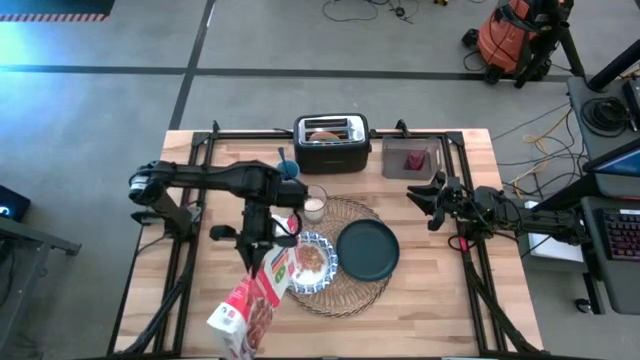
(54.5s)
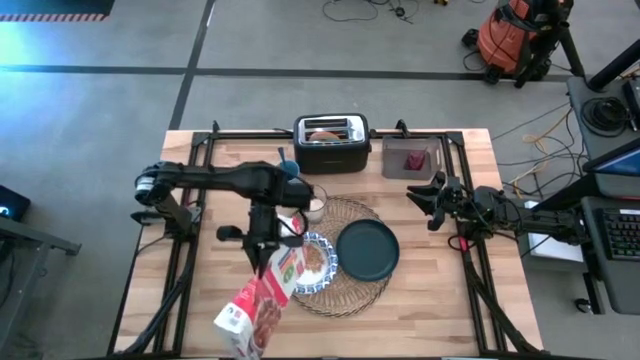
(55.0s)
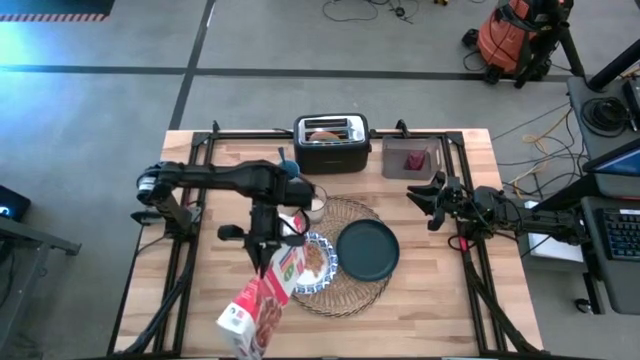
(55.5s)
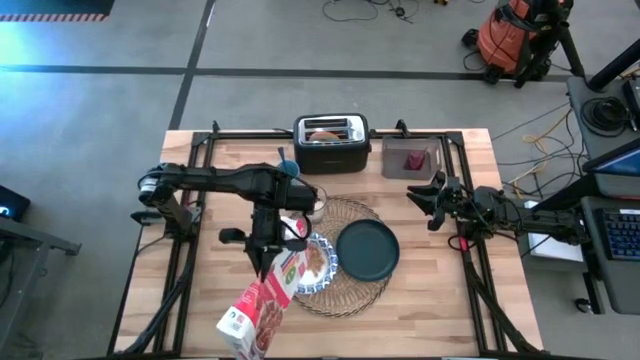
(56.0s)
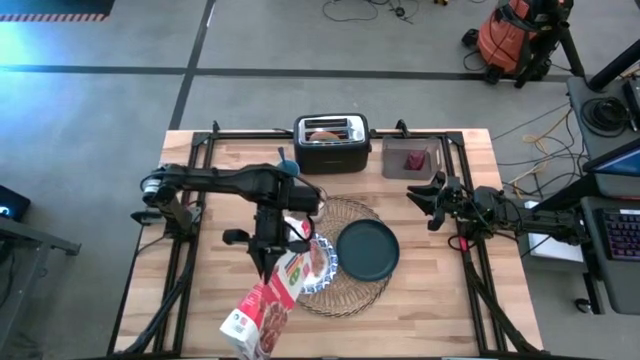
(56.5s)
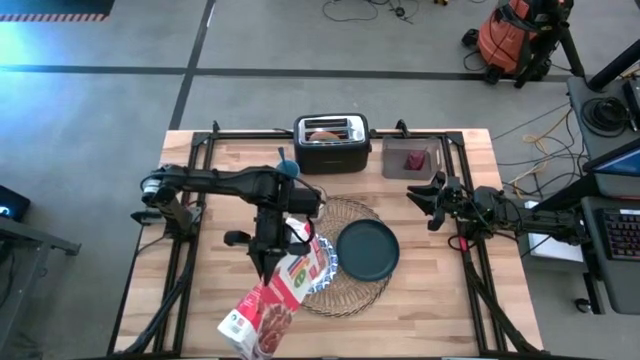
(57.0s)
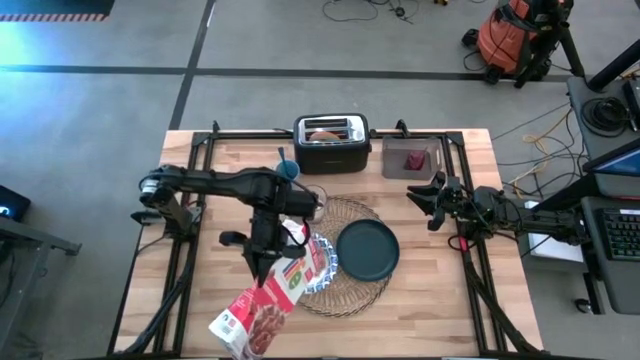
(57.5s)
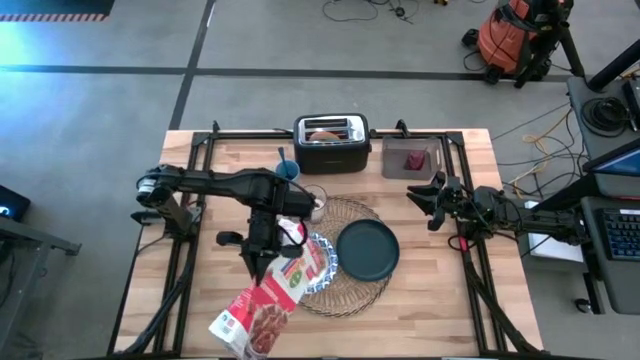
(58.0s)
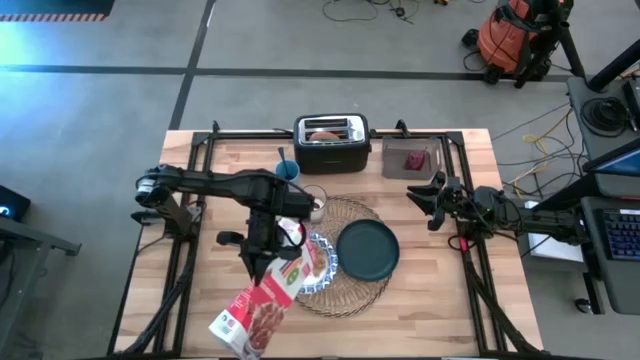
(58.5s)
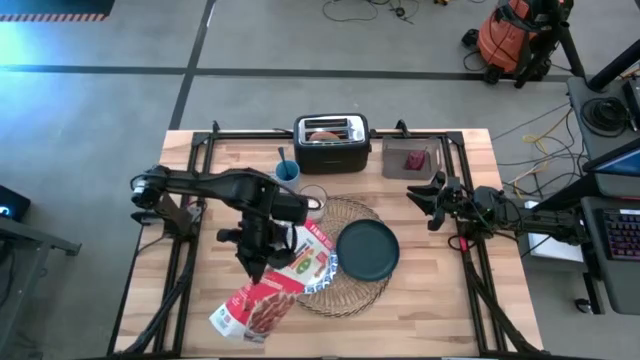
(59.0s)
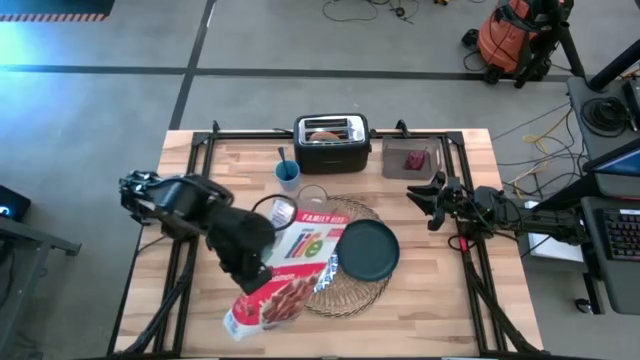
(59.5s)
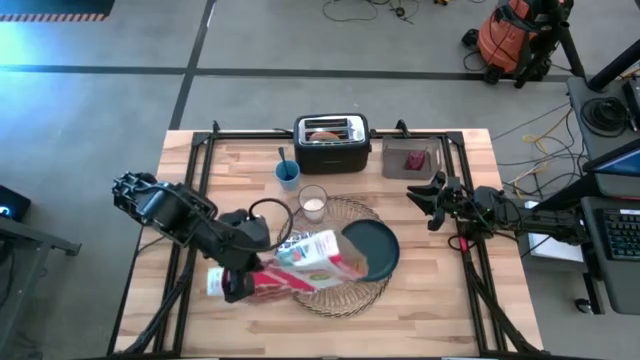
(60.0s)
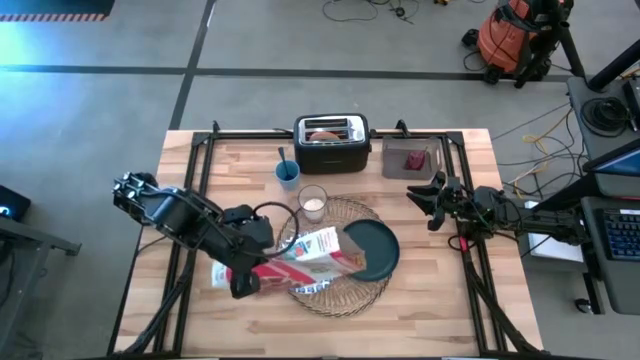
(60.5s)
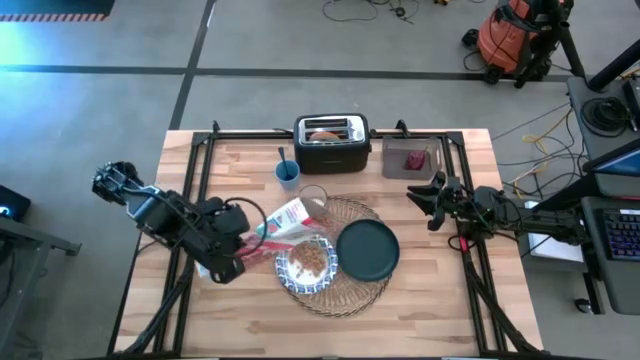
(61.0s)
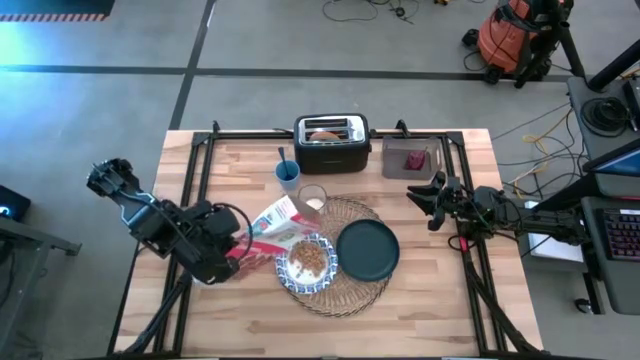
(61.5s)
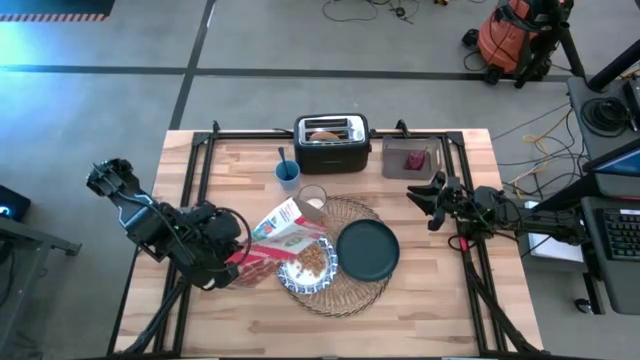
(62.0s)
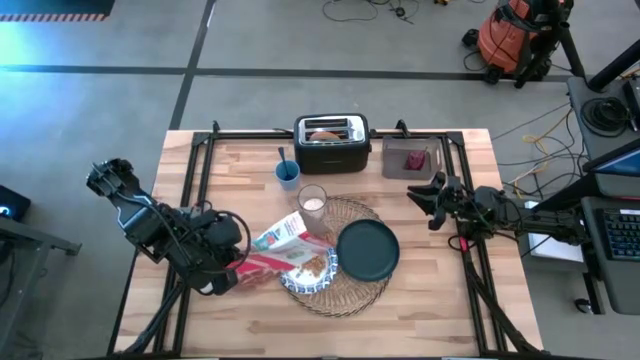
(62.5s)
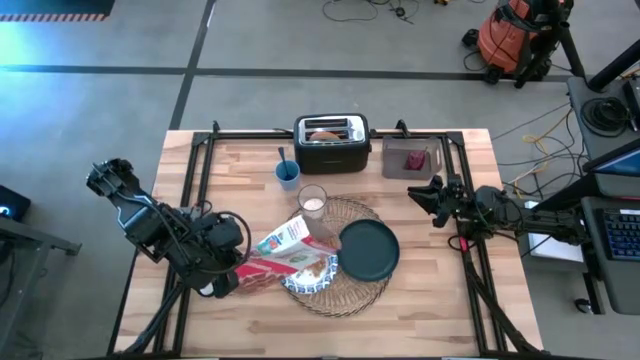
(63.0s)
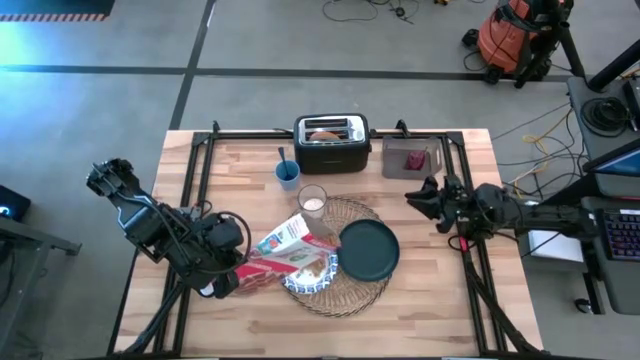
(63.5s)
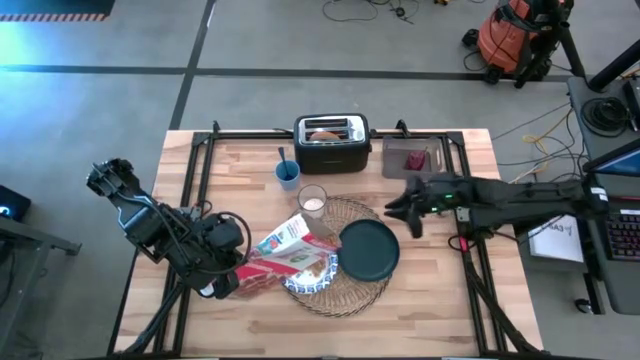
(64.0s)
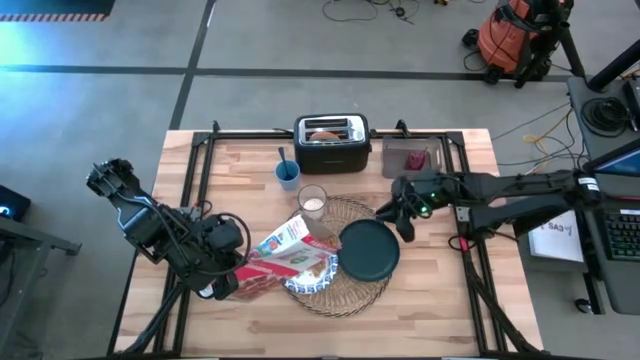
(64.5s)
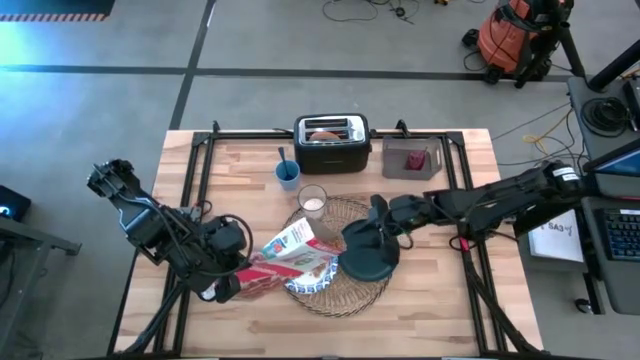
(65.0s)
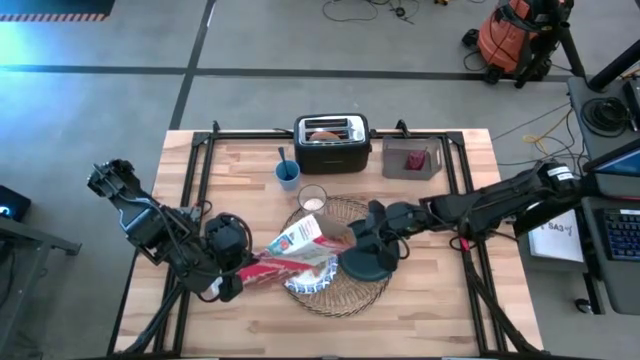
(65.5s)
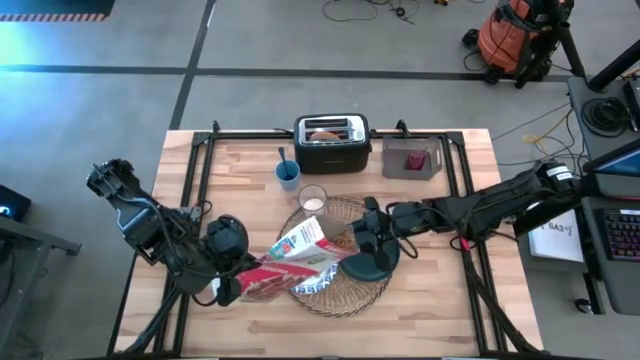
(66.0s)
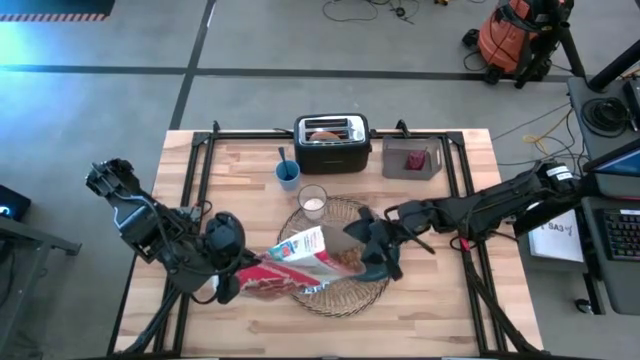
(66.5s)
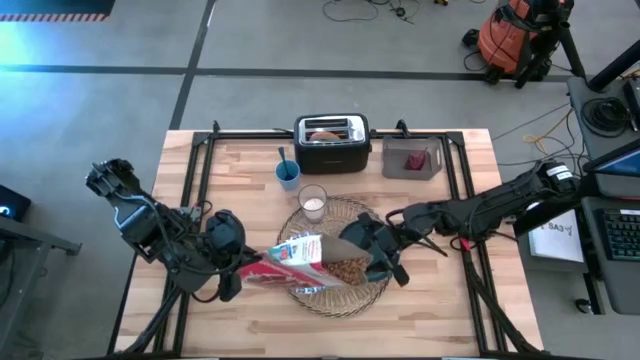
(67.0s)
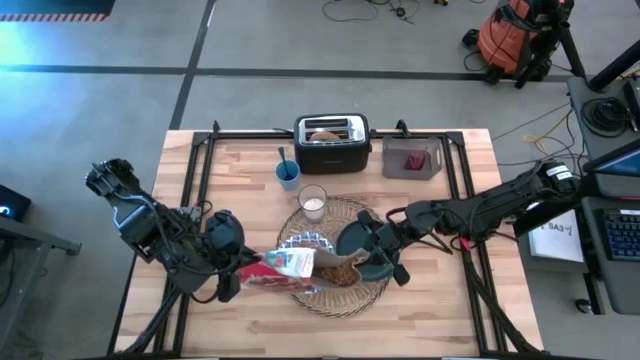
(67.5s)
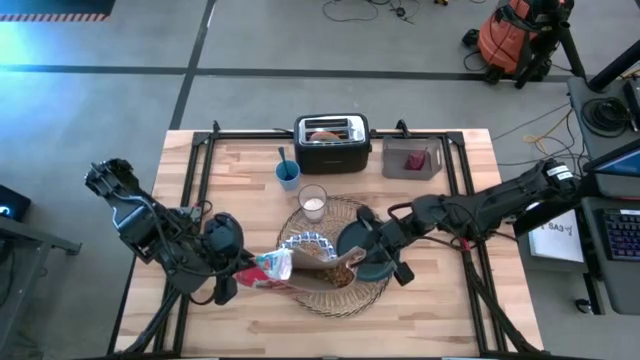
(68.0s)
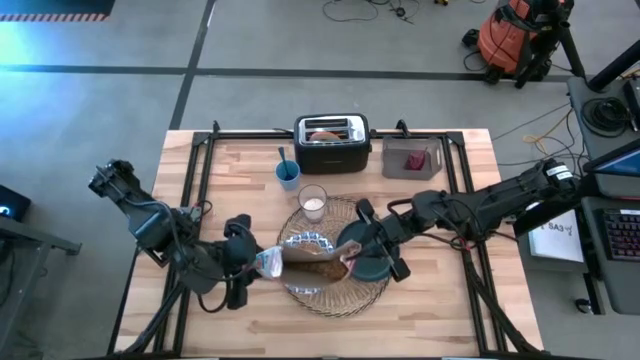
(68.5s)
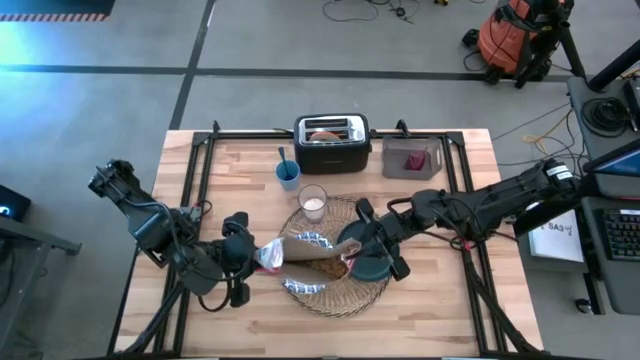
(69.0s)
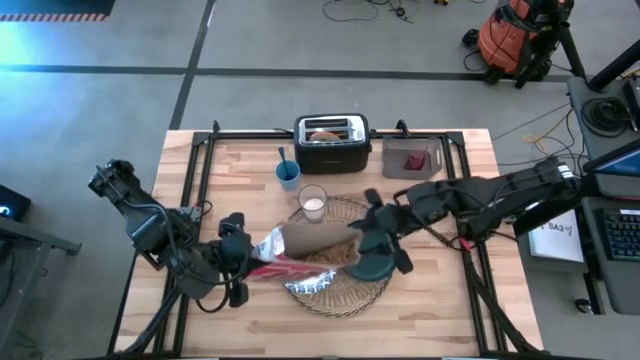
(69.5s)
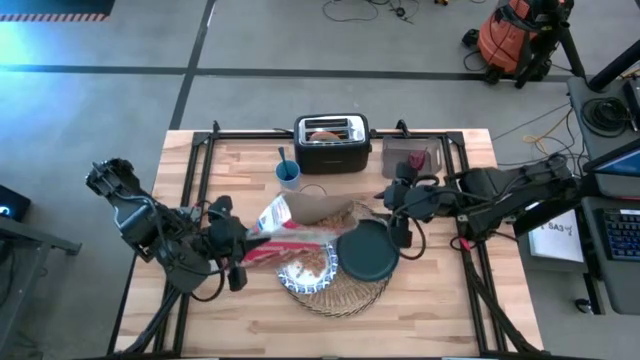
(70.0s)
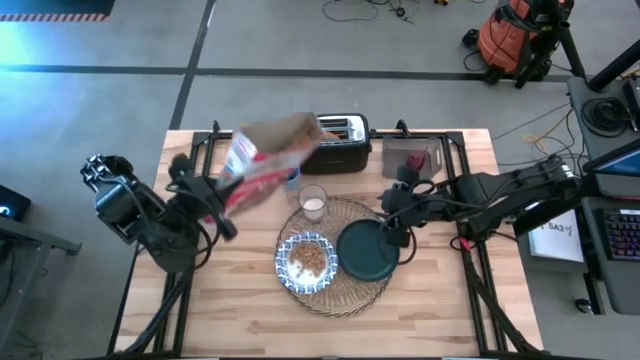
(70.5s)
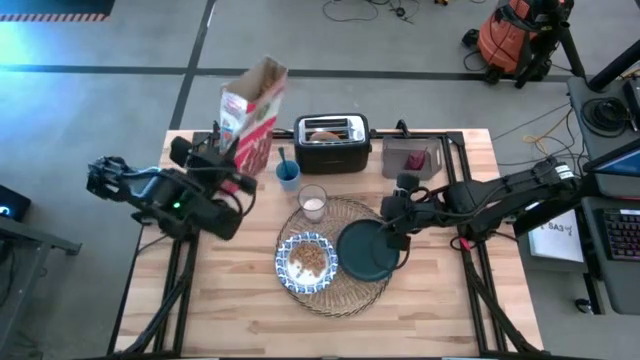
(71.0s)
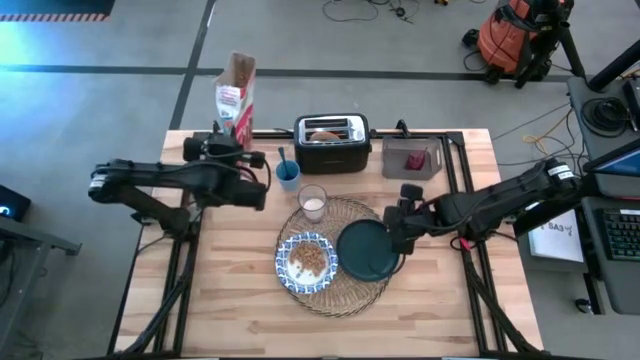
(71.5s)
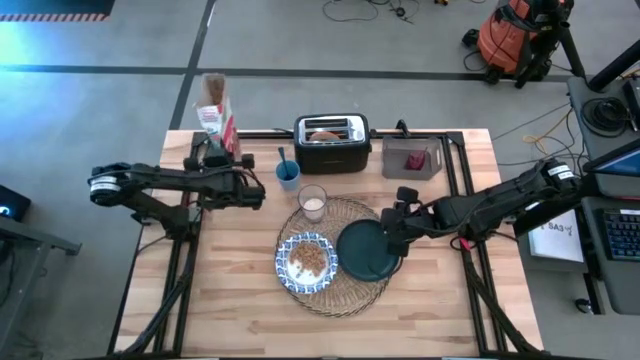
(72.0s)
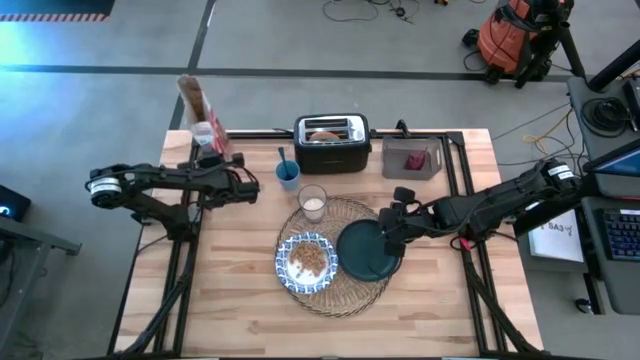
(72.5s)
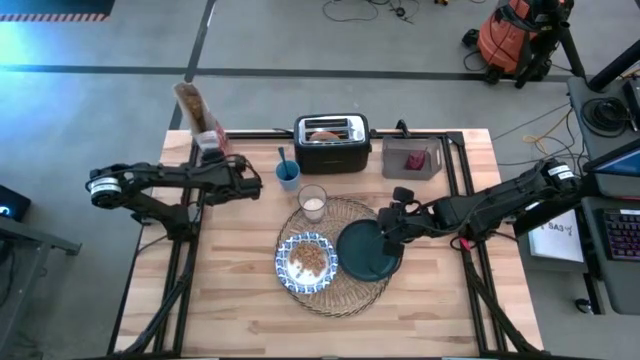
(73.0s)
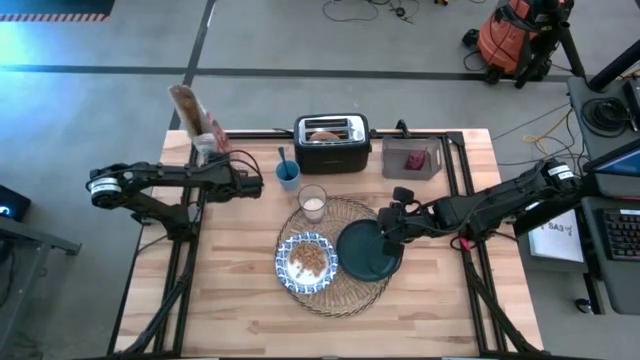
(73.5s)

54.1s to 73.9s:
Task: Arrange a breakfast setting
Pour the cereal from the red cereal box into the white bowl

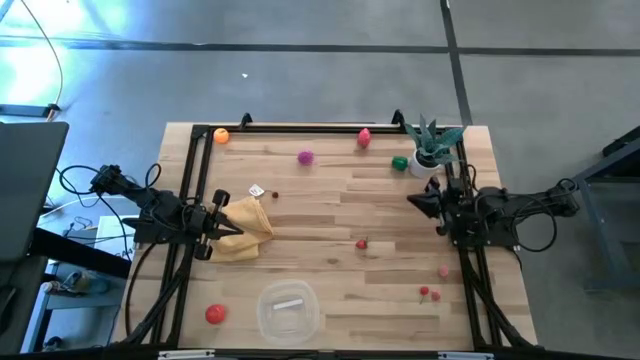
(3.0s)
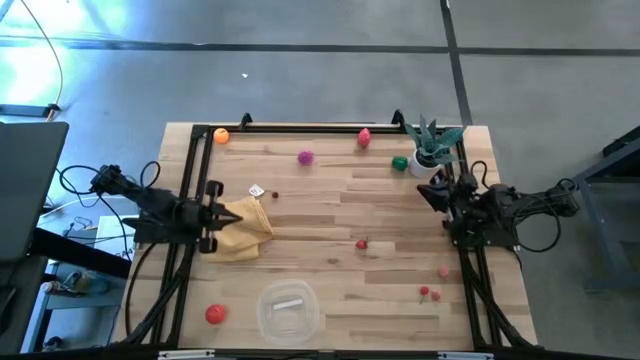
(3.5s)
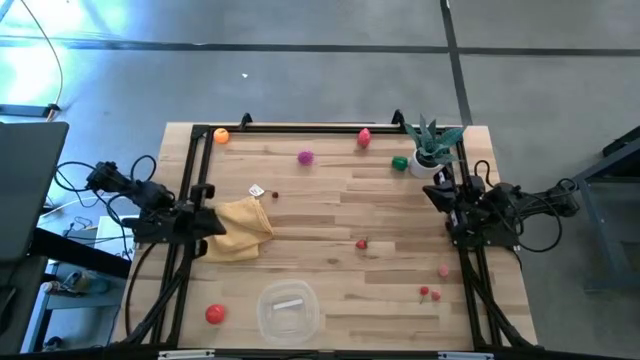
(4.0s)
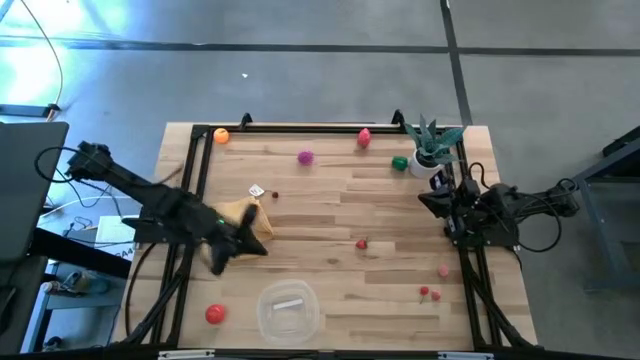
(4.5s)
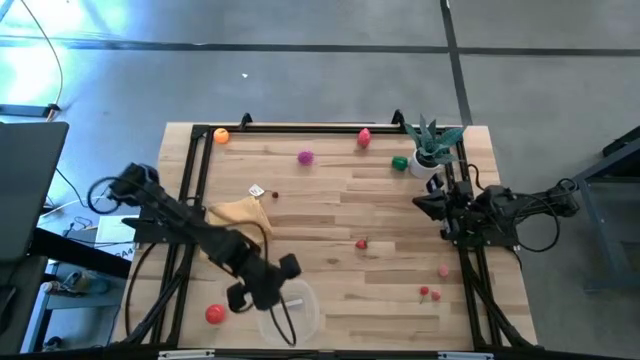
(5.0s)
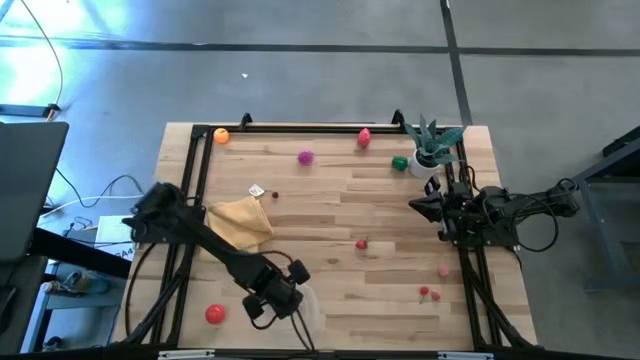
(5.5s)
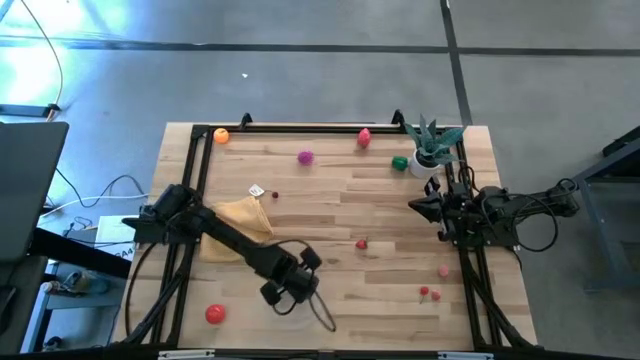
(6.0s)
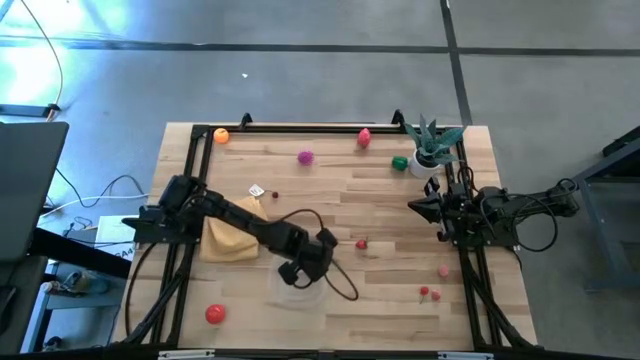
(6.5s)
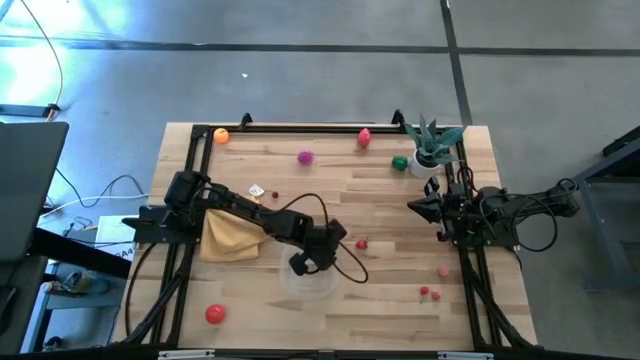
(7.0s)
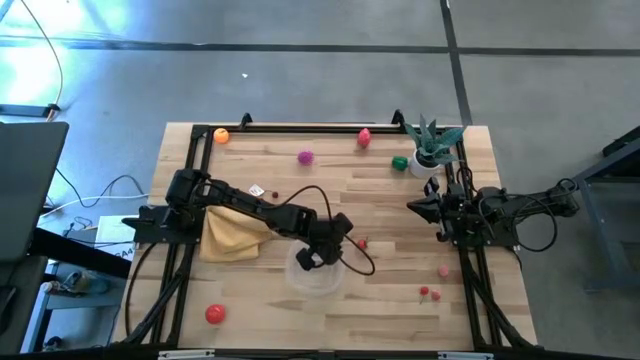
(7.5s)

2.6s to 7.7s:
Task: Pick and placing Produce into tupperware
Move the transparent bin to the center of the table
